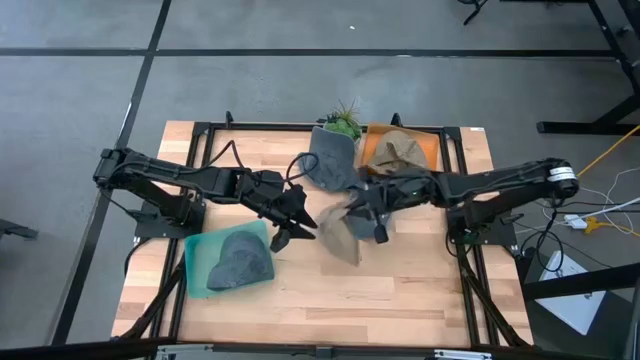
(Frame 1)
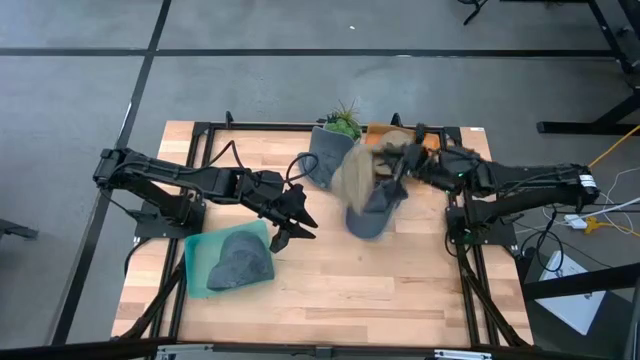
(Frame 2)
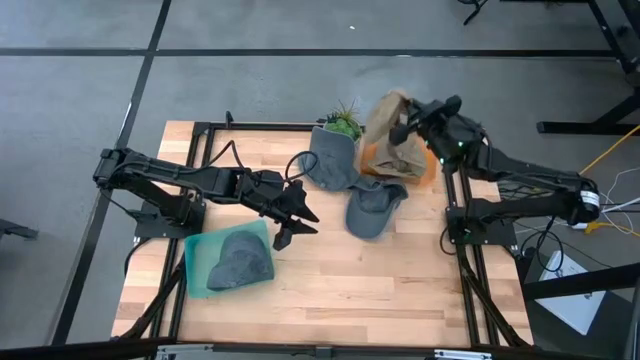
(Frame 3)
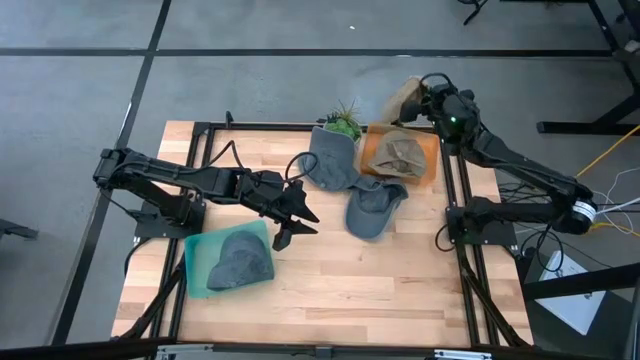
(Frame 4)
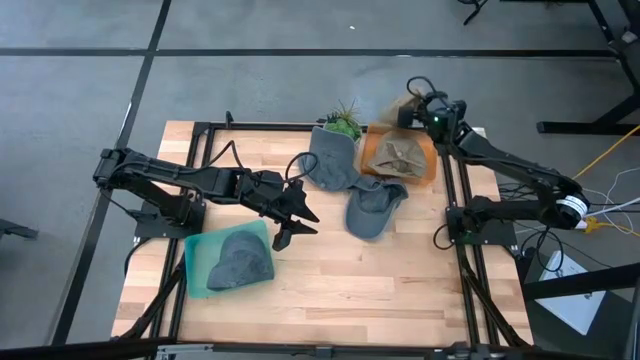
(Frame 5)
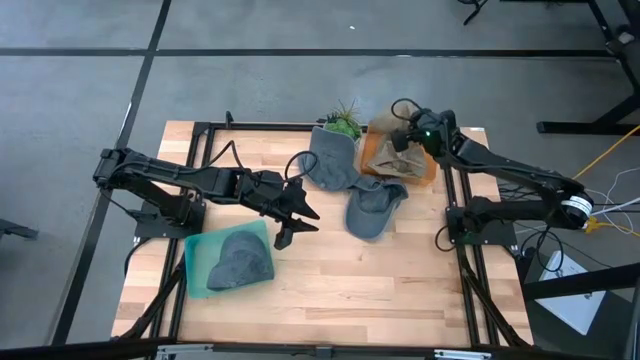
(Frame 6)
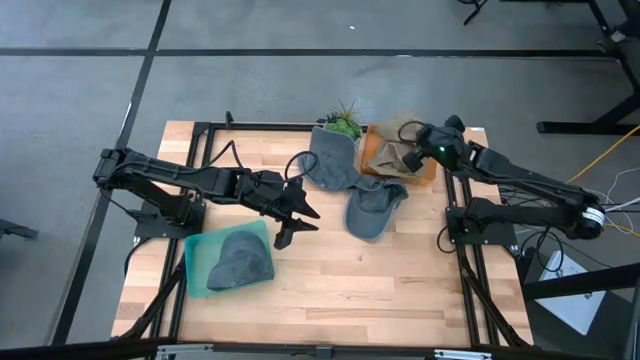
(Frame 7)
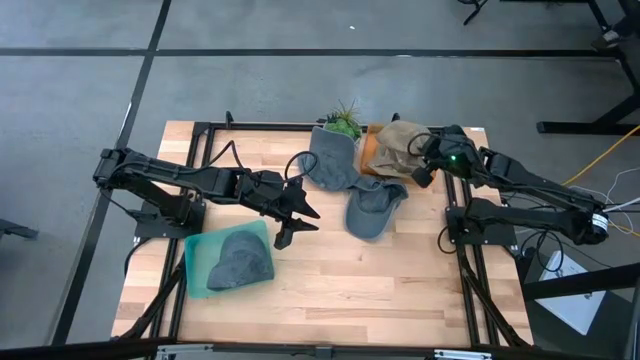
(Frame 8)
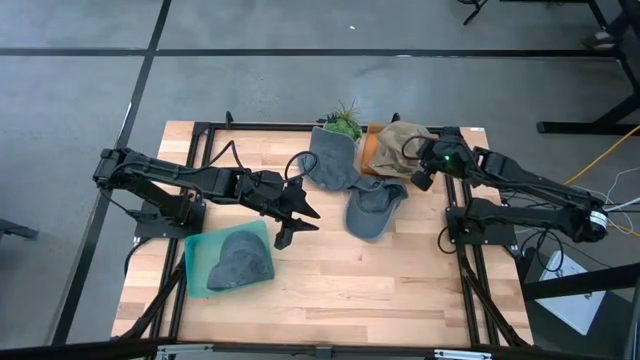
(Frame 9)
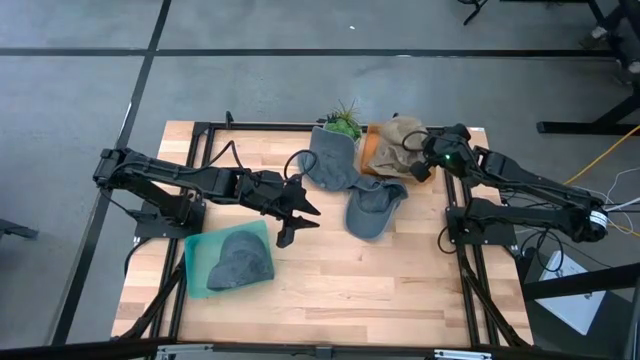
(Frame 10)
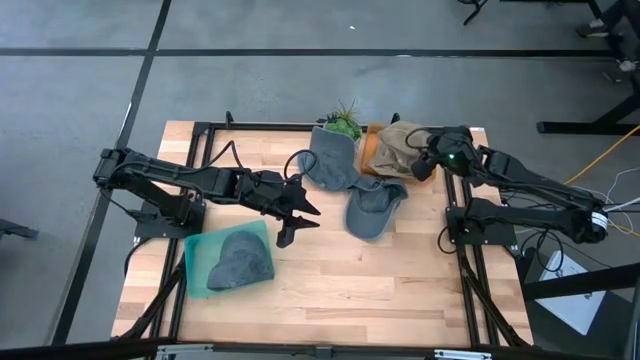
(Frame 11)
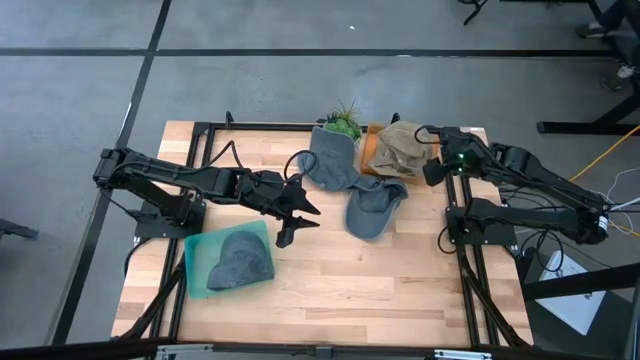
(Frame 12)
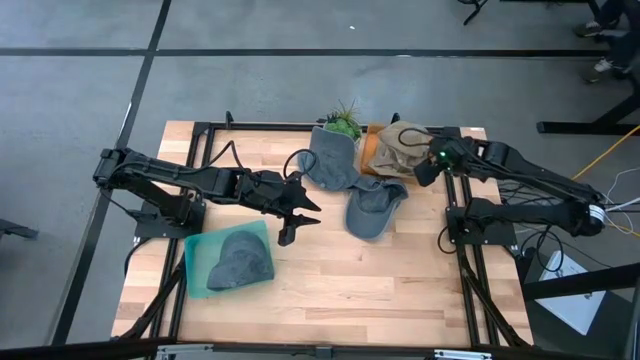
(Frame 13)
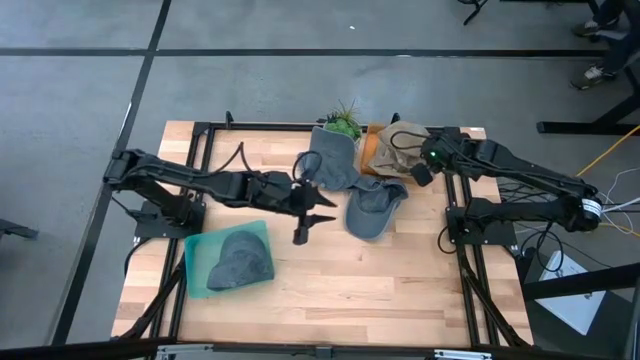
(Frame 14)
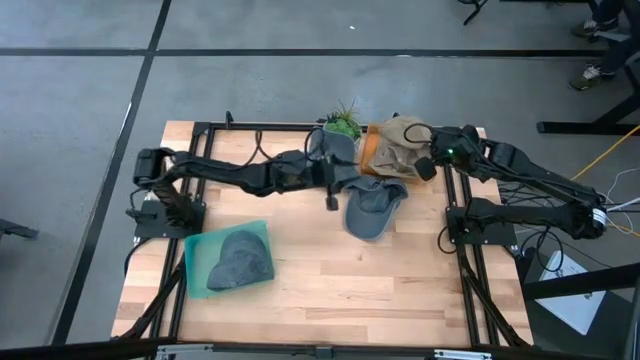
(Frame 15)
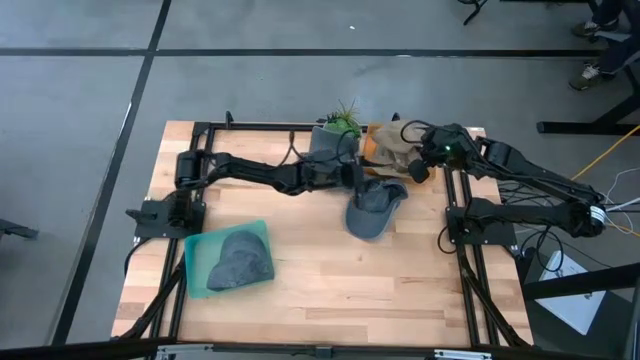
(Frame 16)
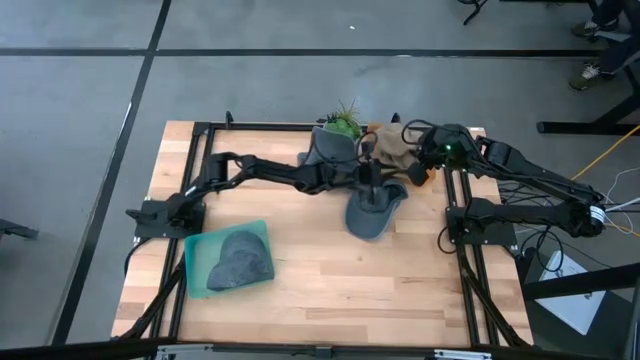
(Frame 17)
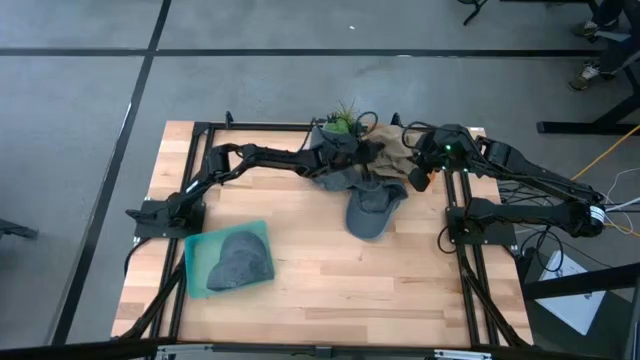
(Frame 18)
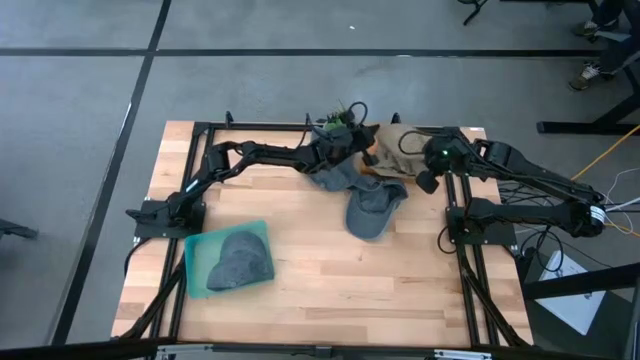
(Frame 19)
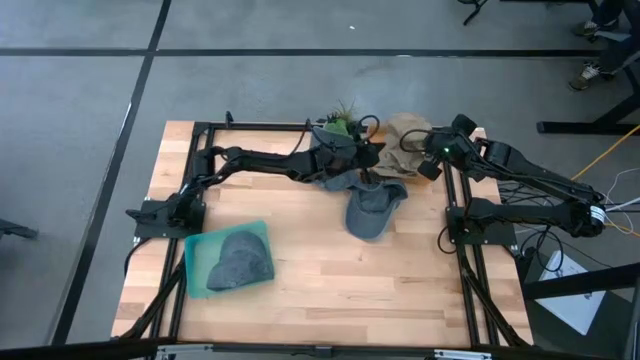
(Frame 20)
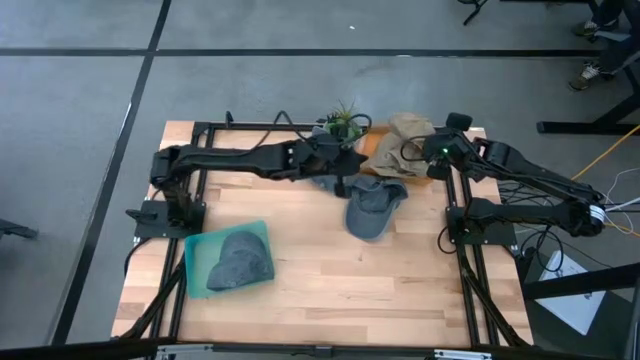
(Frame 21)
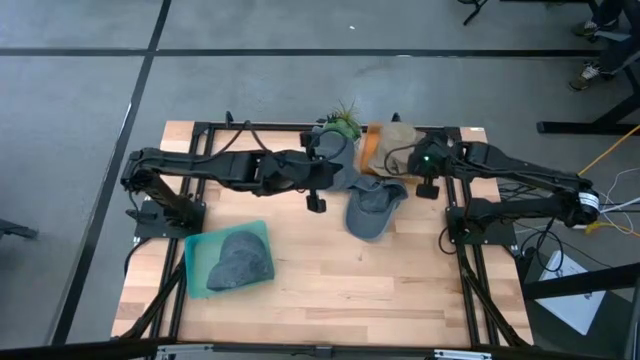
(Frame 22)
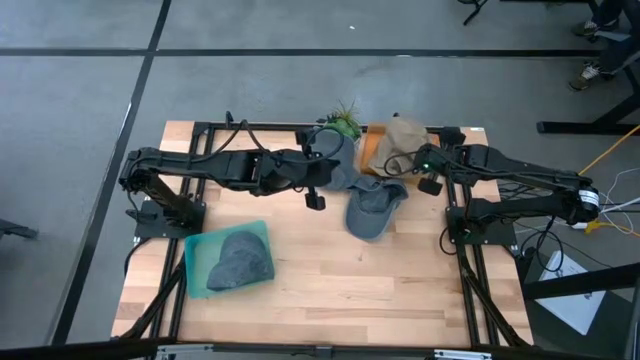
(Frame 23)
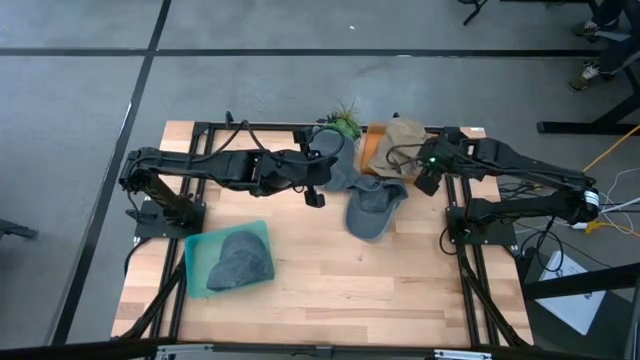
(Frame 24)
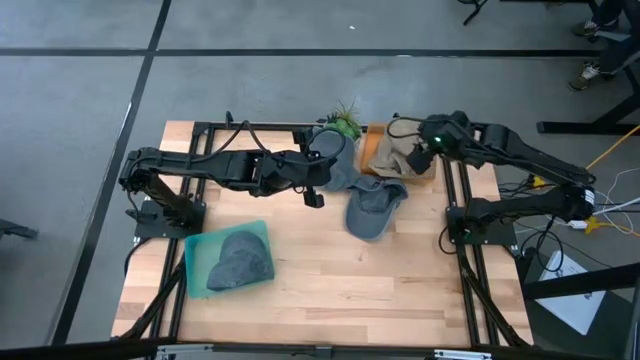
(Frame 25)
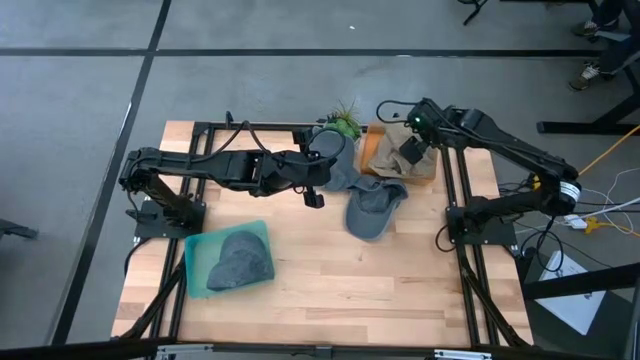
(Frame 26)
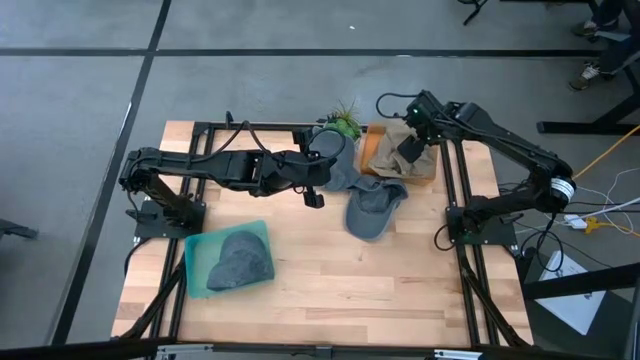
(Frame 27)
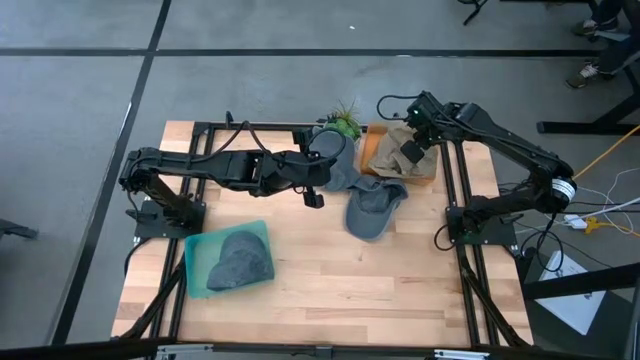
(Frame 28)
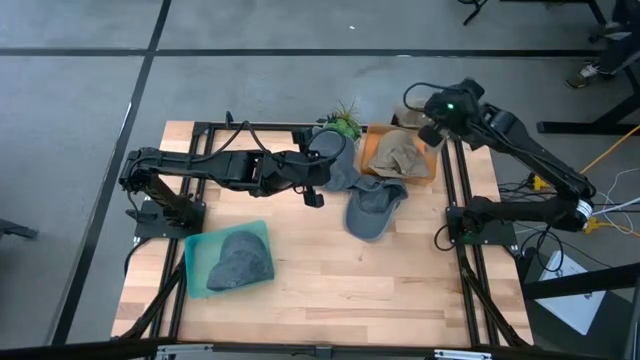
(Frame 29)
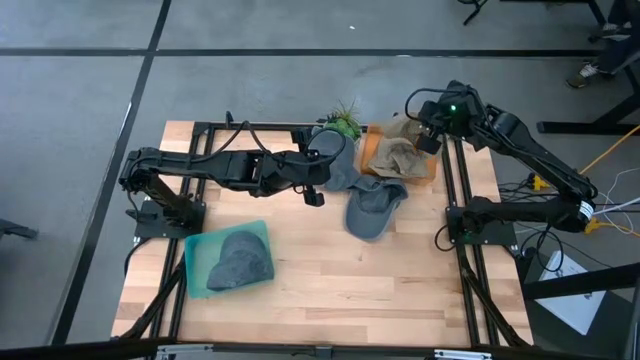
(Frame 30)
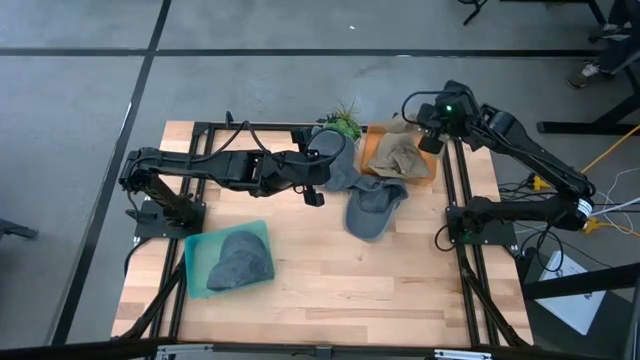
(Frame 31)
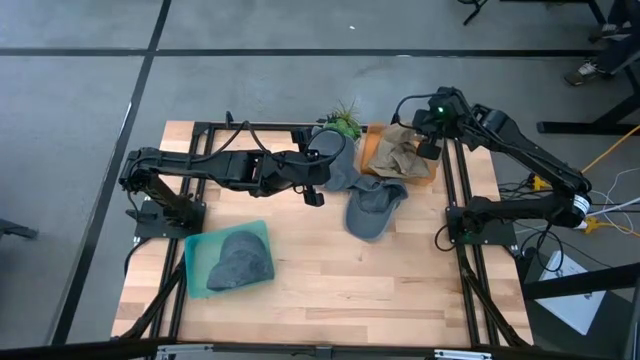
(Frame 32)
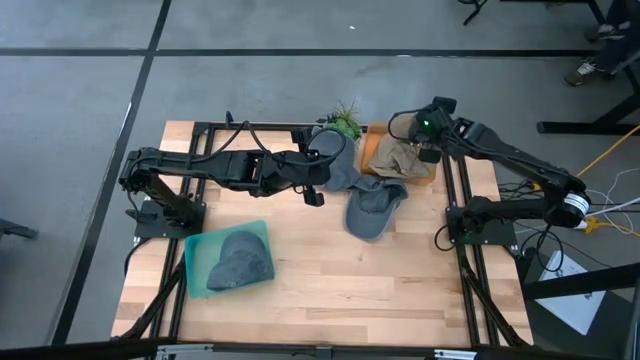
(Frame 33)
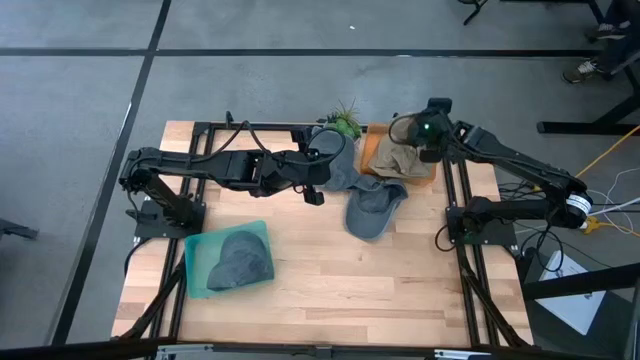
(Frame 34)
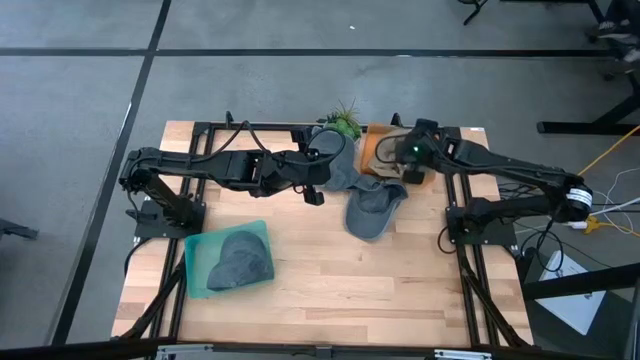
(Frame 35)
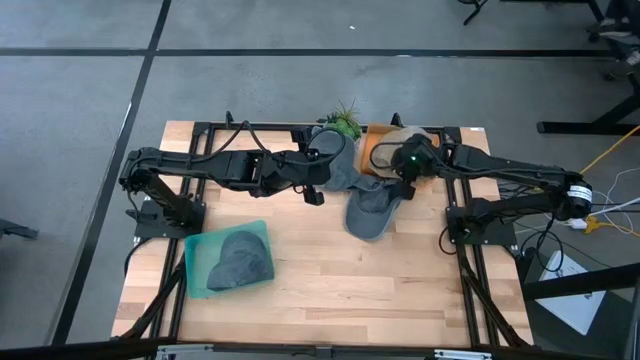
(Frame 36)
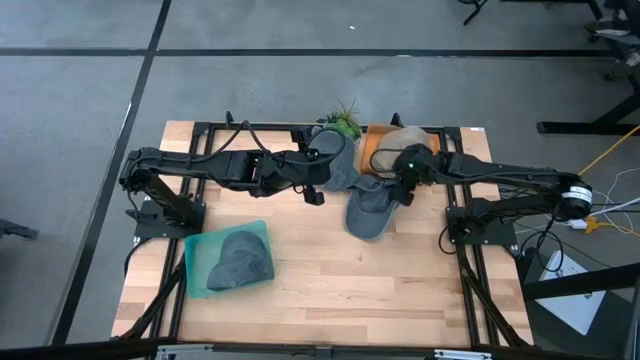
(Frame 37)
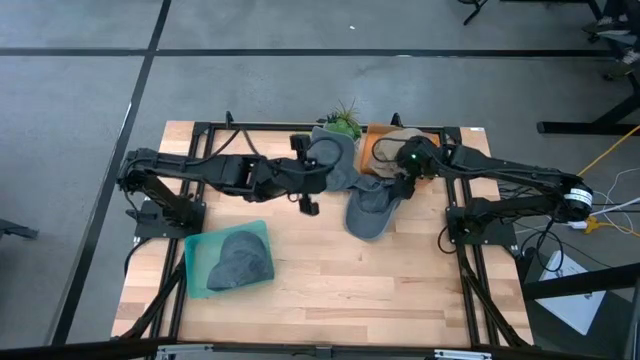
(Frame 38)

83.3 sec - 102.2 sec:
Task: Pick & Place hat
Put the brown cap into the orange bin
